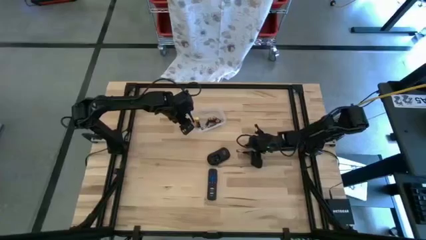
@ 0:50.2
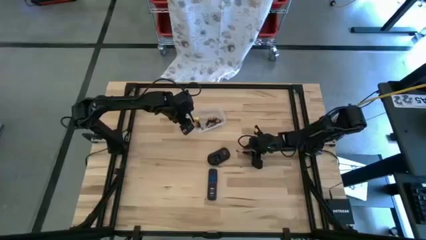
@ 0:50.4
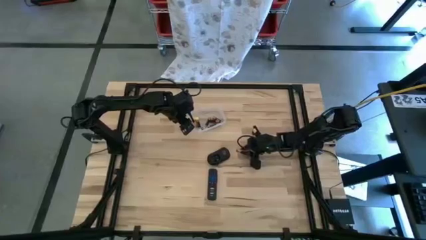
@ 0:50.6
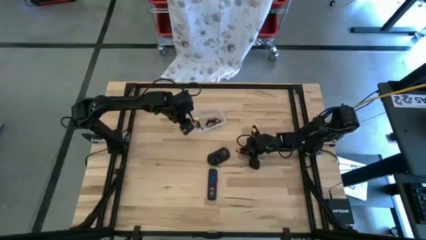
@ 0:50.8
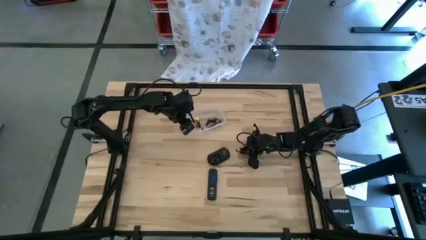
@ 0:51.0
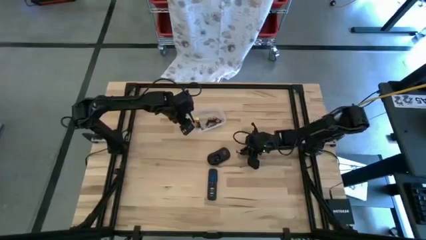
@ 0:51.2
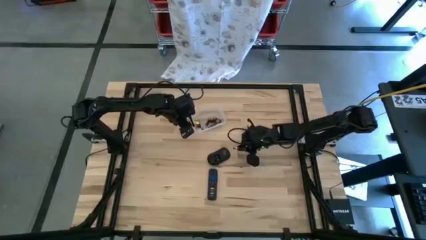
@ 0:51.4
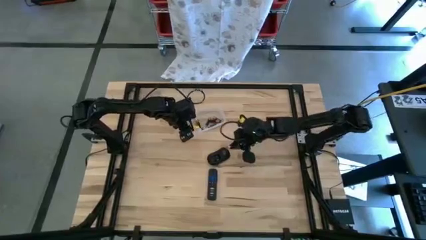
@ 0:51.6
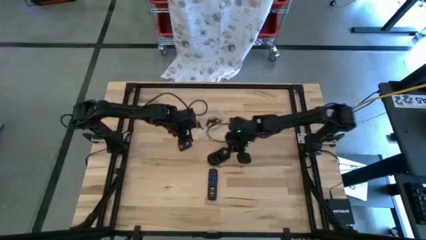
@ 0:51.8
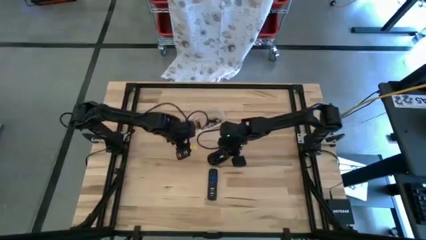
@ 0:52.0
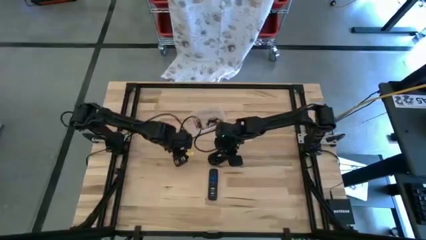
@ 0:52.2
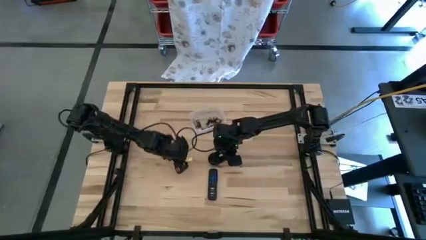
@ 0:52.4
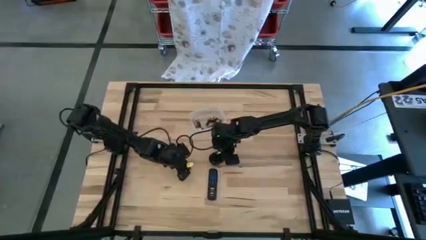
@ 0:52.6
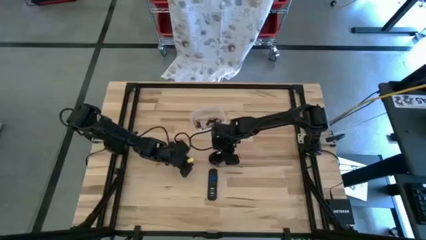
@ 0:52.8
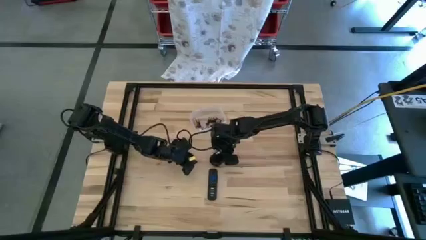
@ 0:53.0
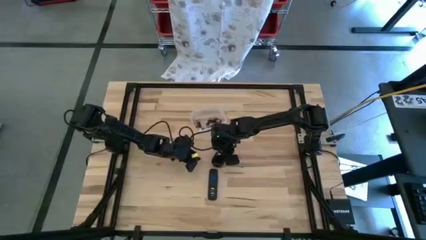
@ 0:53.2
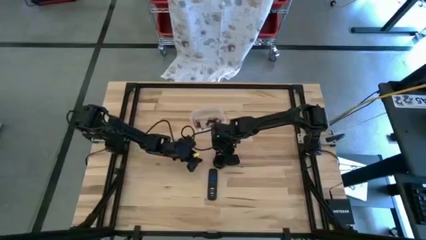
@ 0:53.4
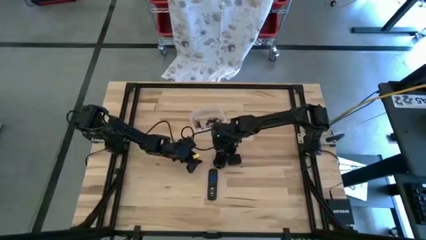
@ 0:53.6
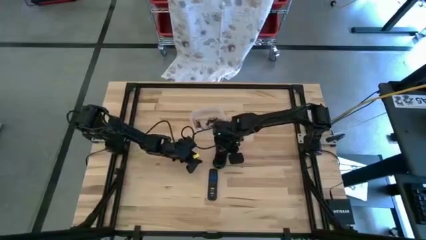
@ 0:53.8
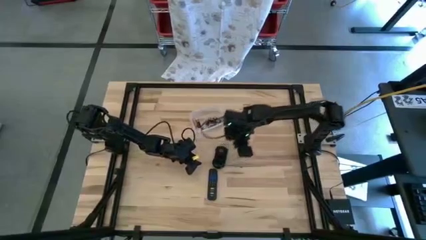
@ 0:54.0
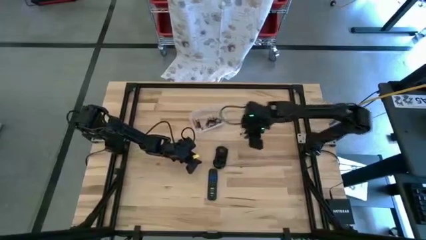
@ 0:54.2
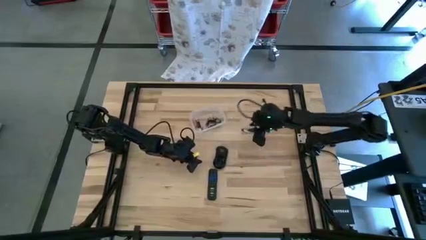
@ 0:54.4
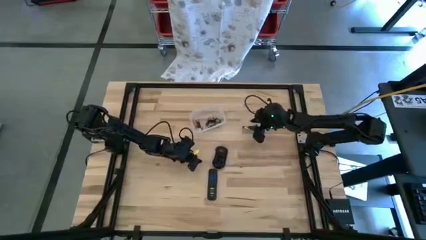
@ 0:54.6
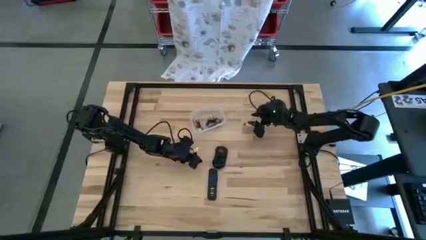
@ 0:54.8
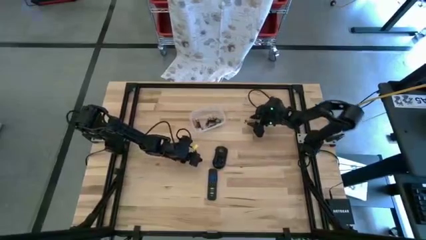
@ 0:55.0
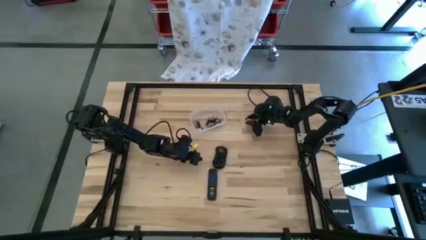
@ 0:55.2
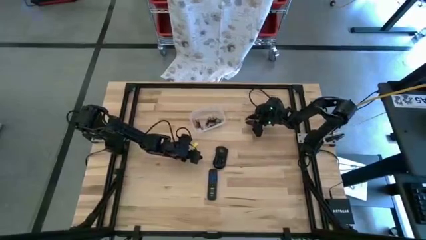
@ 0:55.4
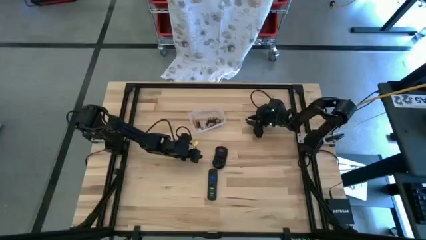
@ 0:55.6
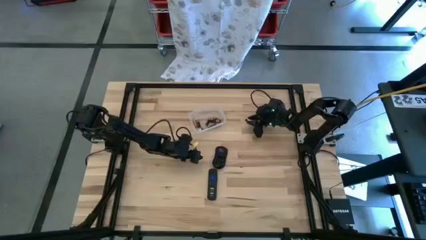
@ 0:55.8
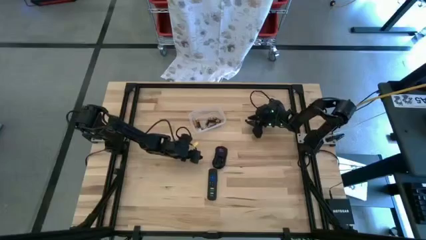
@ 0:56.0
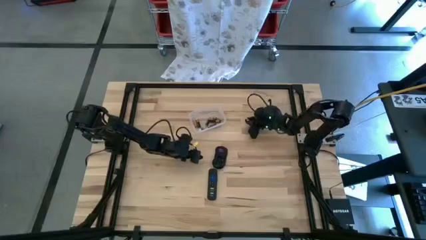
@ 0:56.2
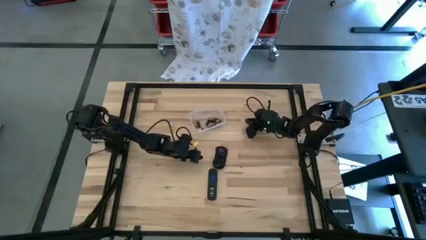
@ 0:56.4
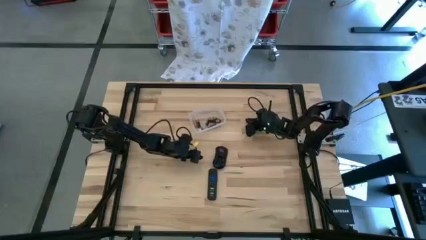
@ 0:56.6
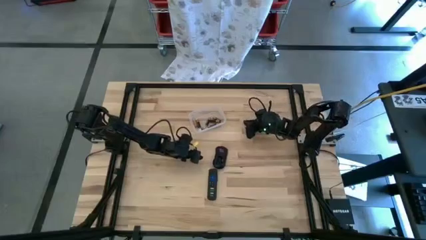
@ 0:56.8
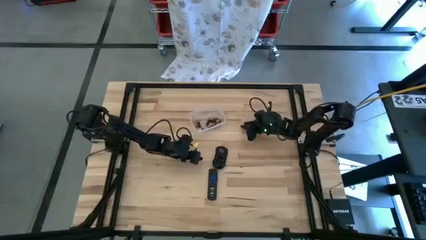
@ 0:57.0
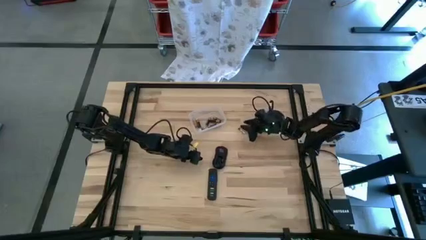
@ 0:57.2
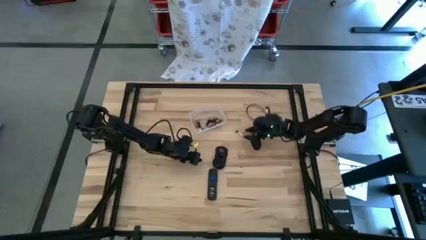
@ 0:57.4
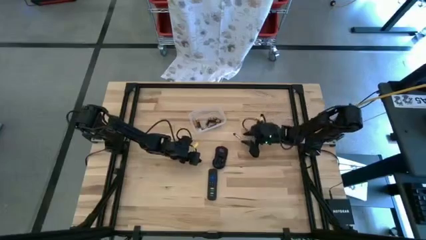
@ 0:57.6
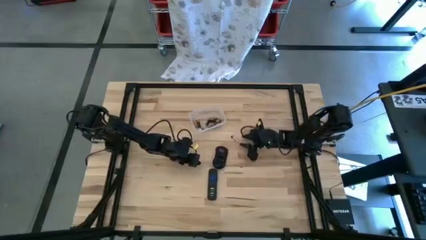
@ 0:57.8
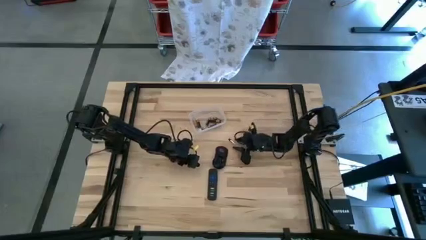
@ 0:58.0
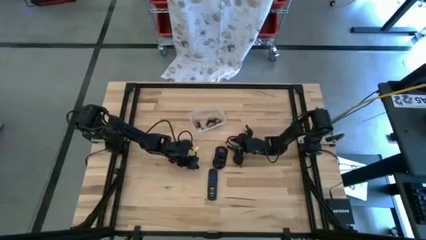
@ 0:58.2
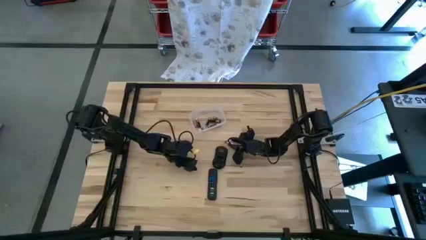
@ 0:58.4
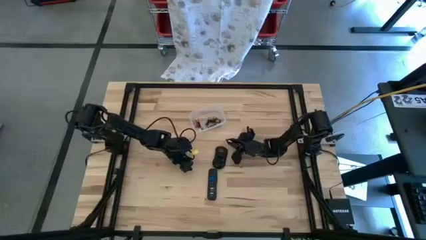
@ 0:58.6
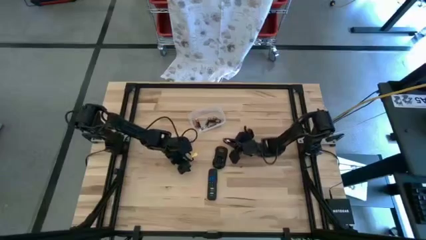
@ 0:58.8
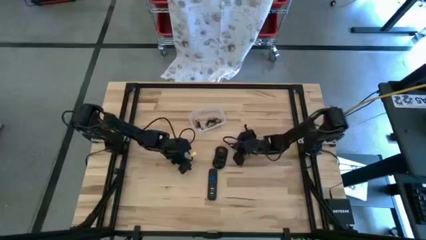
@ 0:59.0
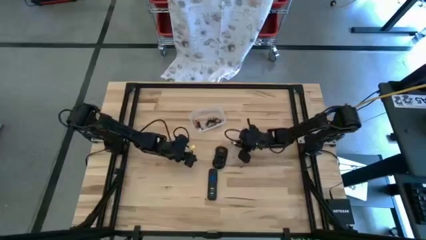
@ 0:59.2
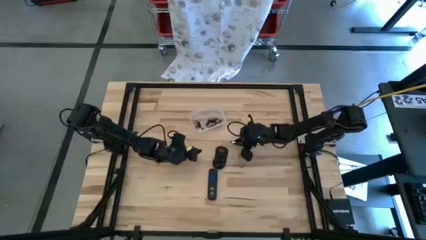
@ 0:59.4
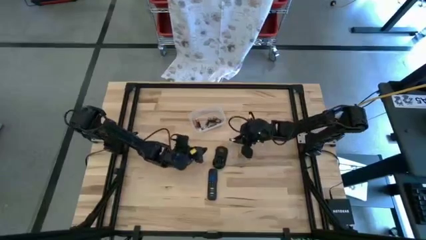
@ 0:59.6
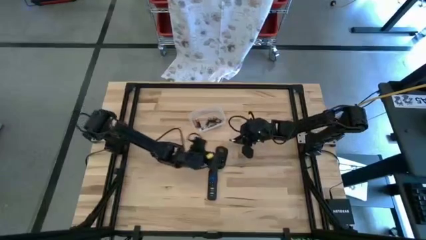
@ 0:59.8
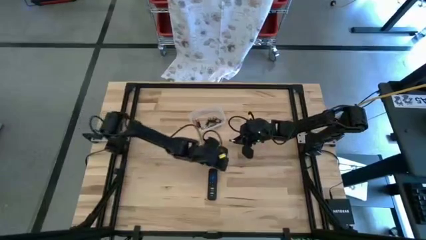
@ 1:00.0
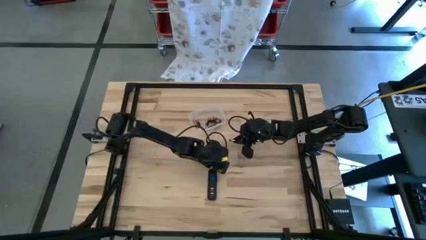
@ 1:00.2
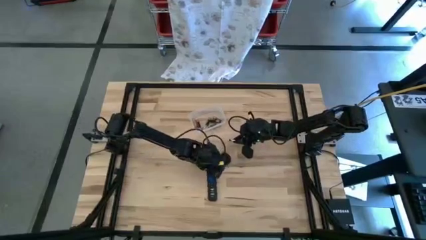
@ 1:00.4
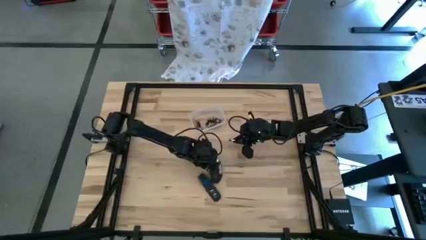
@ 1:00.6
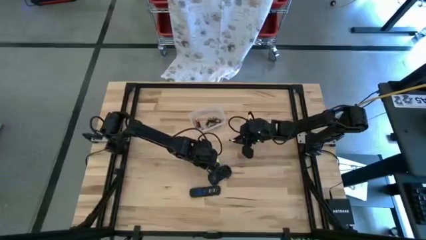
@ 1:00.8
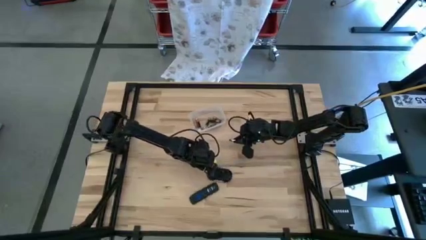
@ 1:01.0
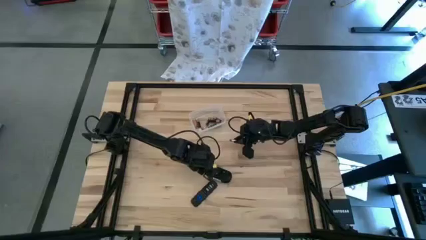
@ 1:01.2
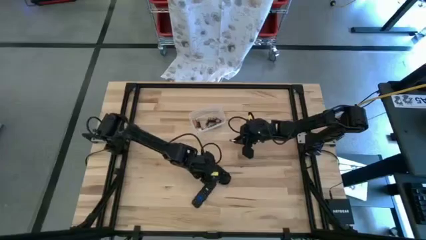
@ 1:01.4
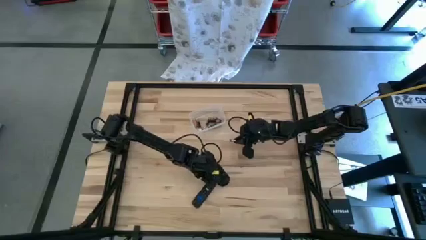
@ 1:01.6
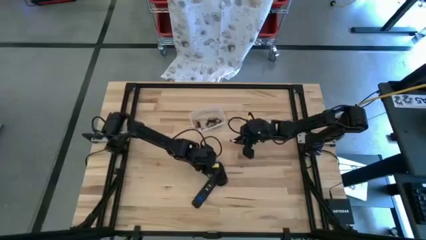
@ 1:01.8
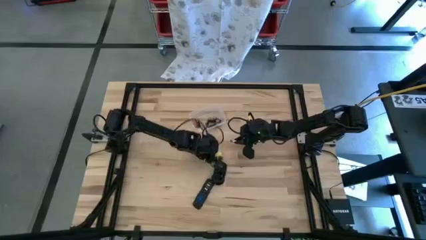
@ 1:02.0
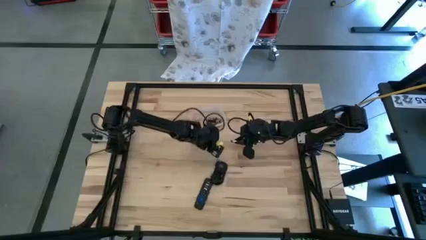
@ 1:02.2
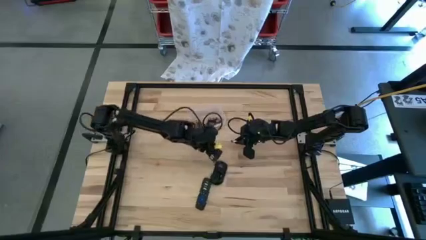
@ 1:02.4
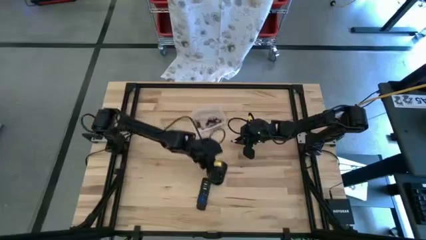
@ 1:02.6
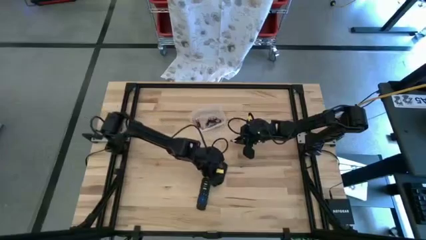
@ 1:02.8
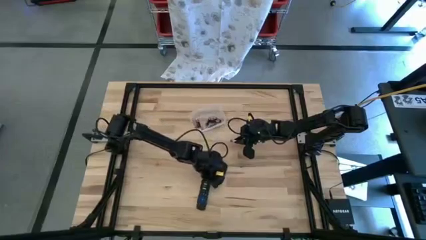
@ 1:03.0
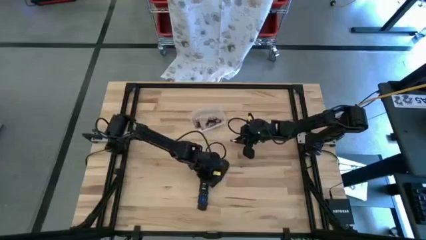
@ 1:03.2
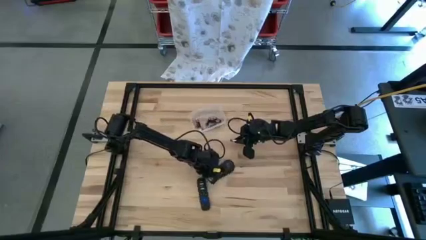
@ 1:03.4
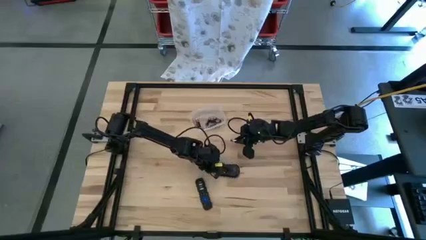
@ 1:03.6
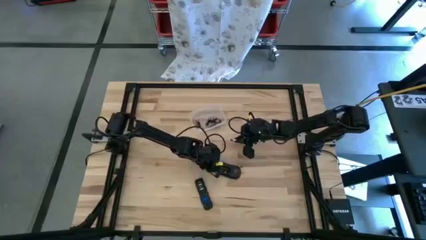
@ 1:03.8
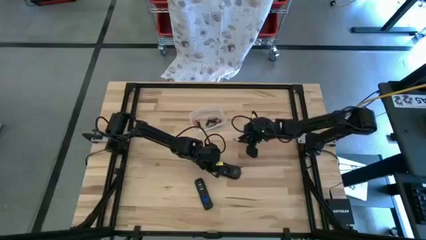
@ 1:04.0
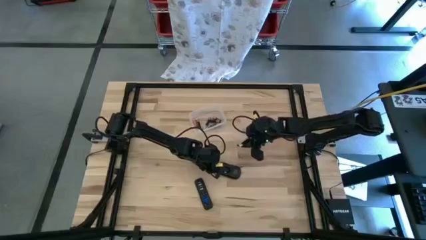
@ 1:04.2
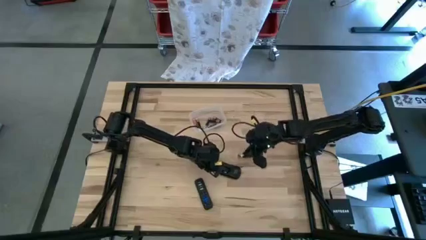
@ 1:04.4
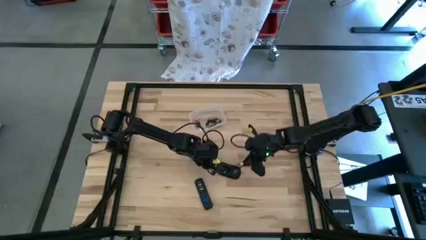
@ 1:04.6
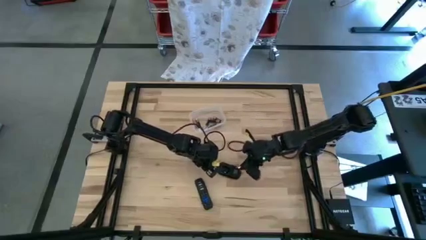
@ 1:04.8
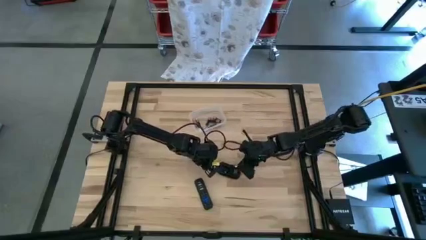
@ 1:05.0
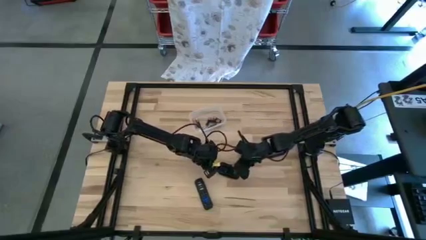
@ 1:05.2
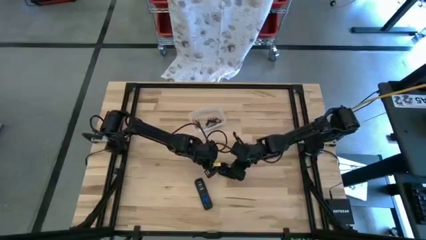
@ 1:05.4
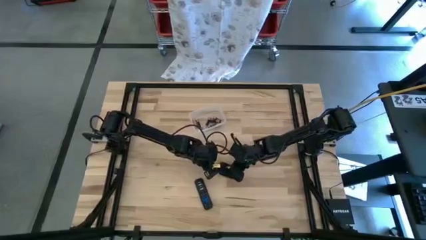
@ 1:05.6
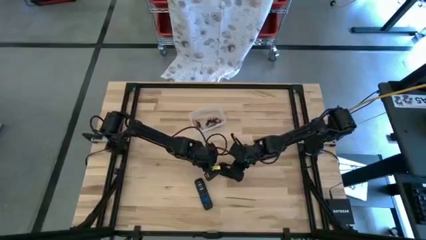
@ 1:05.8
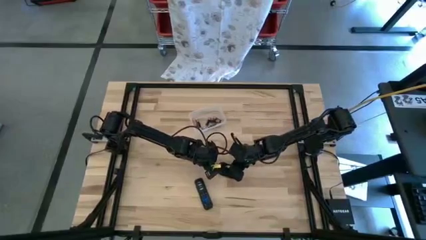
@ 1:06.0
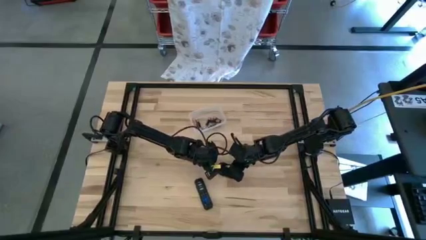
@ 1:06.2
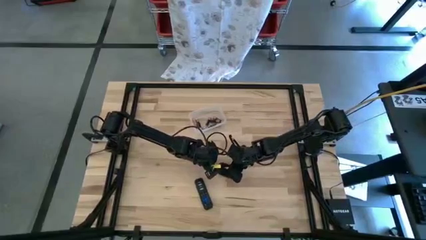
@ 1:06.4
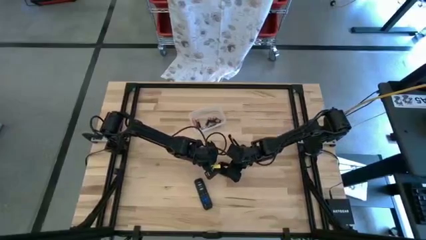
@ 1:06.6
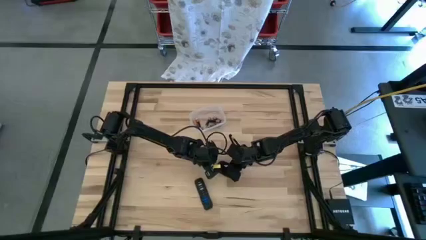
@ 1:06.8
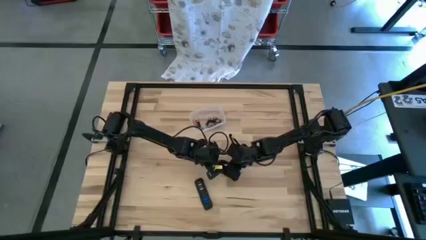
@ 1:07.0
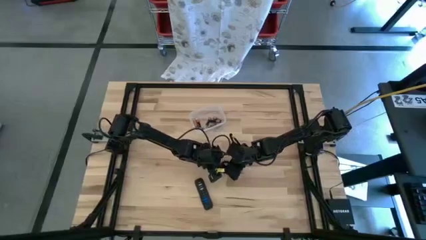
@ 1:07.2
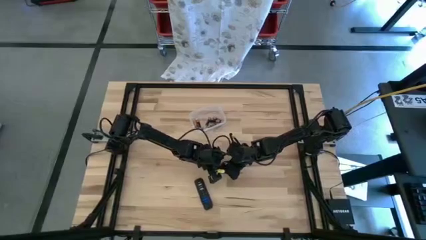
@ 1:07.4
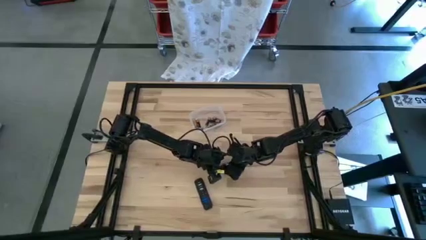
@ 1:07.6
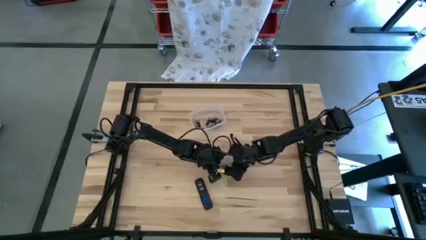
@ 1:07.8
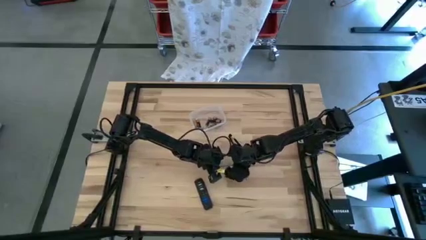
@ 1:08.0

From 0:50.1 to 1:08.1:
Task: Insert battery
Insert the silver battery into the mouse
